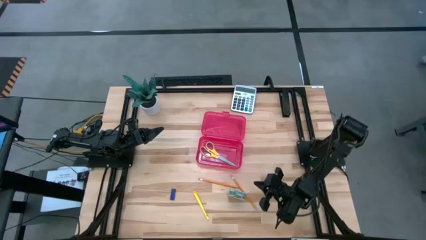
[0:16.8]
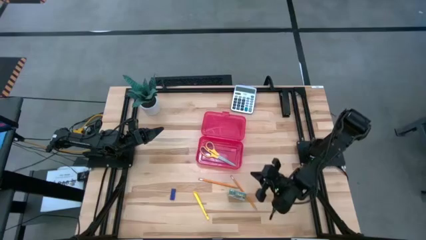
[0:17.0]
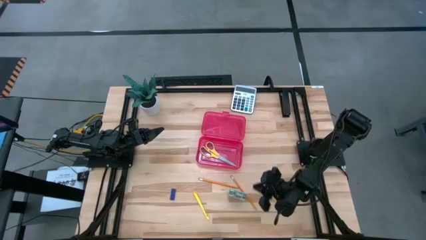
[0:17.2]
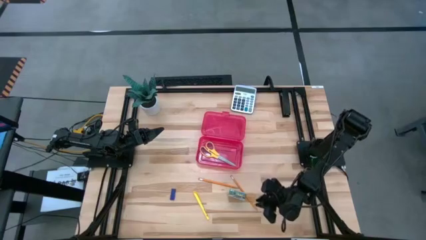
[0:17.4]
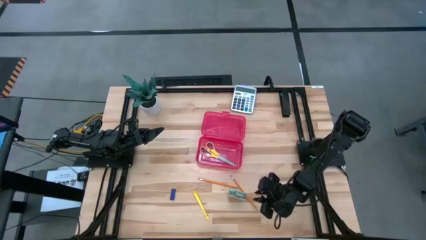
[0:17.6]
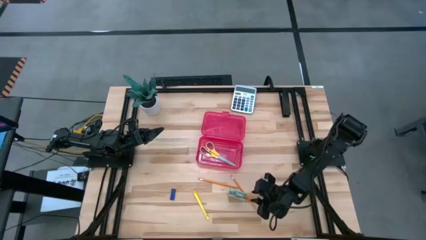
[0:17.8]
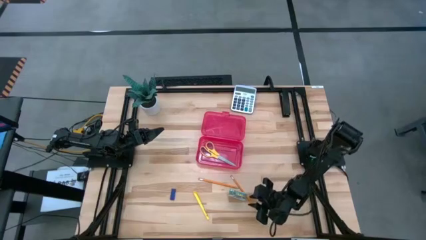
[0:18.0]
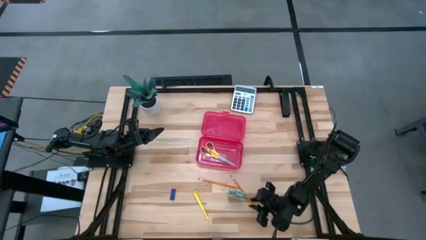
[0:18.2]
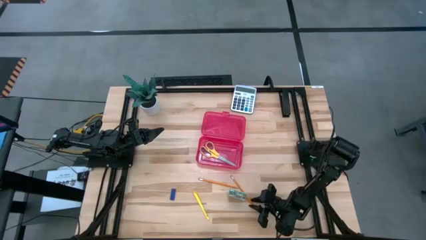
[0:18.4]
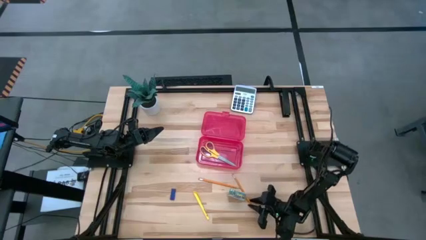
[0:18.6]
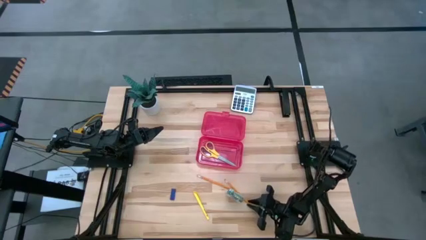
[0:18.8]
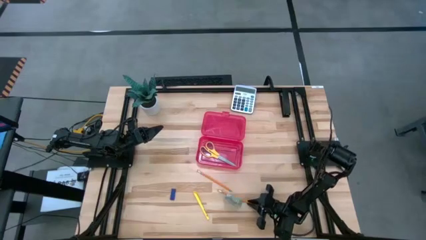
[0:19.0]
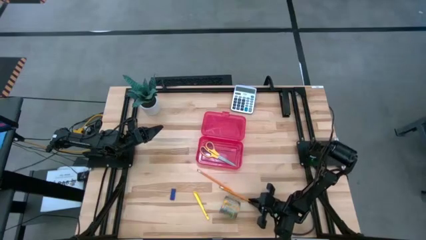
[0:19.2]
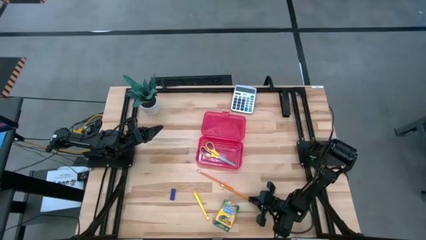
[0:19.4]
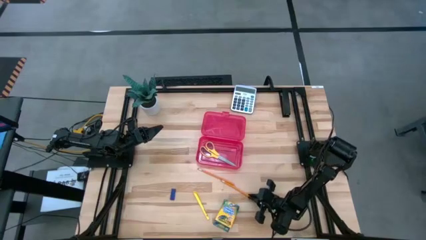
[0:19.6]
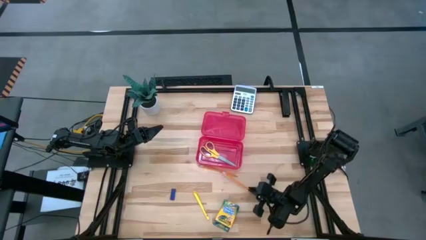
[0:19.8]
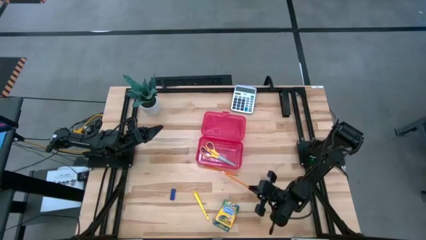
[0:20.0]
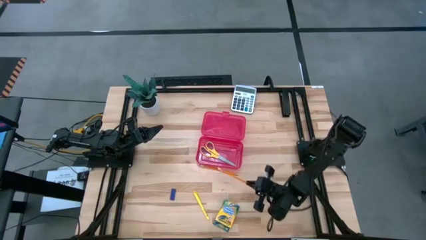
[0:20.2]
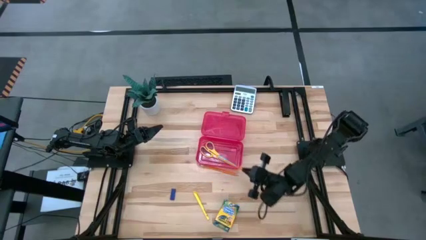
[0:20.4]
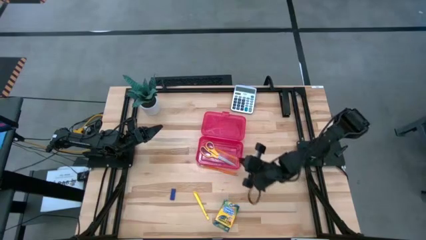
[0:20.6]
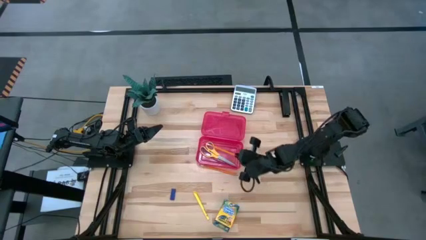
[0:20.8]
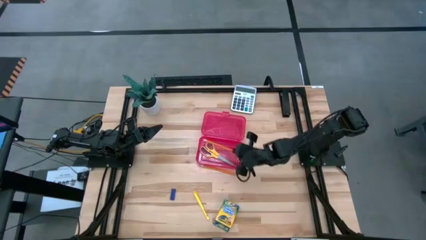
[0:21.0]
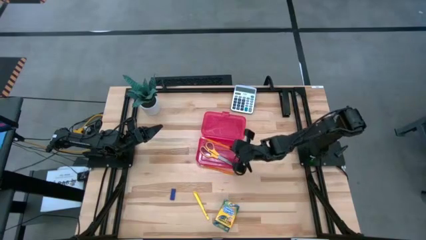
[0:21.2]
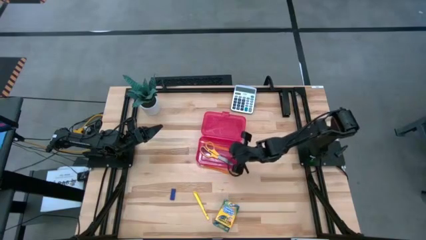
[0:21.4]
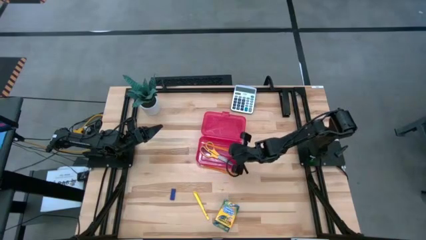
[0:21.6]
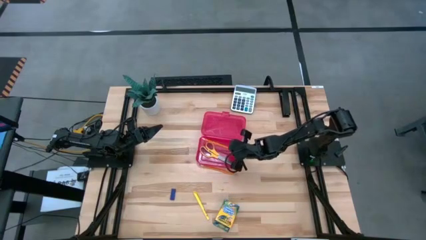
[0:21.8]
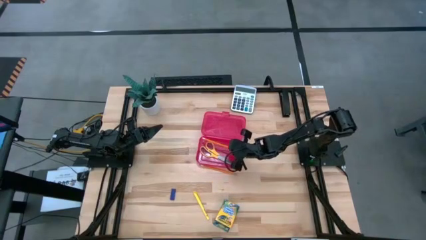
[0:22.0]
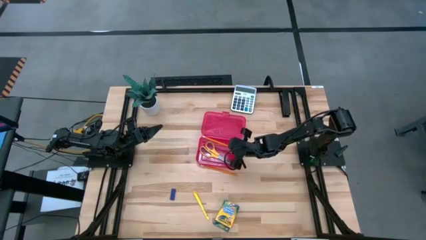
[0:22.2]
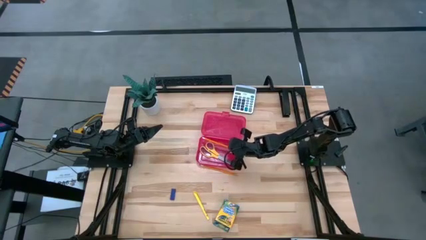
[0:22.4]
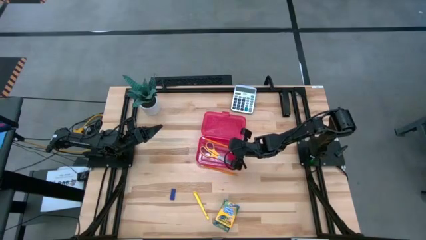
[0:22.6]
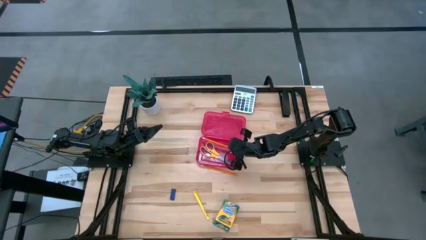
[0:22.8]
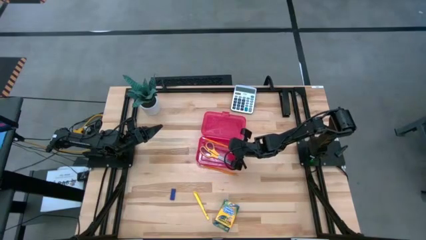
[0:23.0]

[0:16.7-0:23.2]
Task: Pack school essentials
Put the right yellow pencil into the red supply box

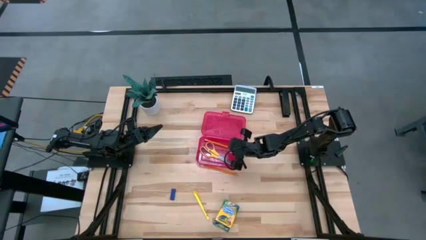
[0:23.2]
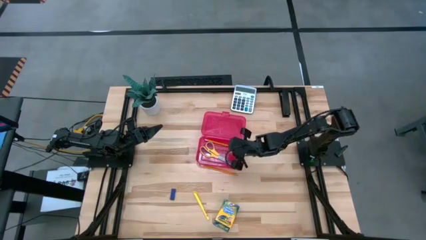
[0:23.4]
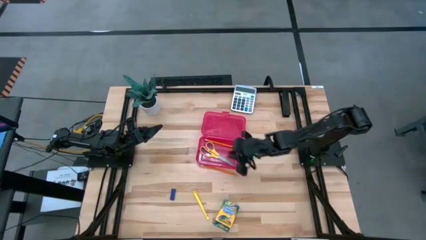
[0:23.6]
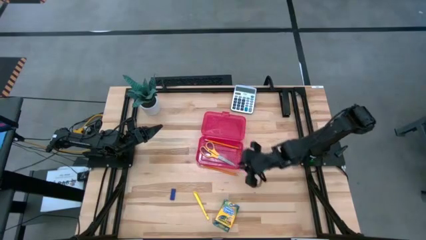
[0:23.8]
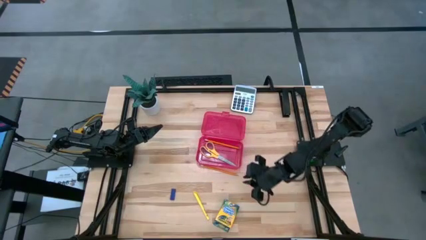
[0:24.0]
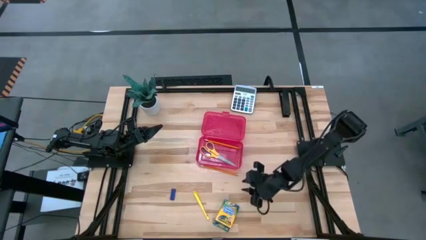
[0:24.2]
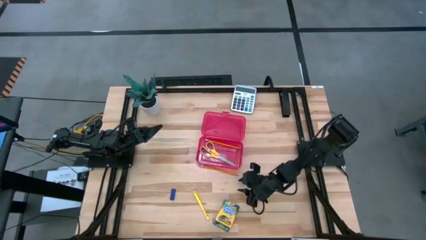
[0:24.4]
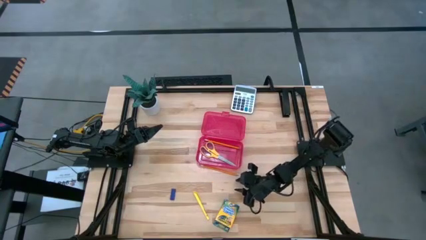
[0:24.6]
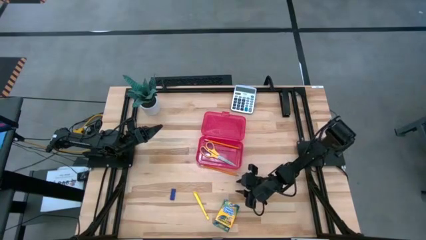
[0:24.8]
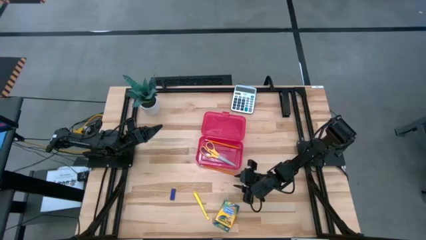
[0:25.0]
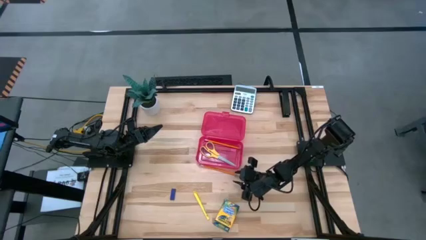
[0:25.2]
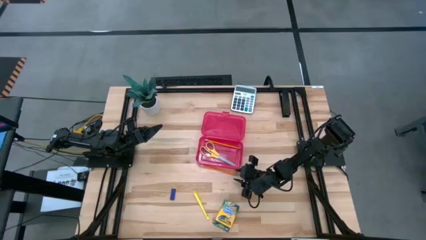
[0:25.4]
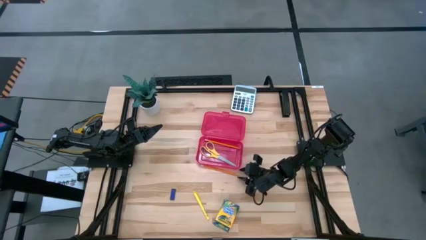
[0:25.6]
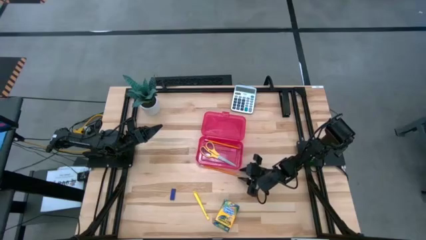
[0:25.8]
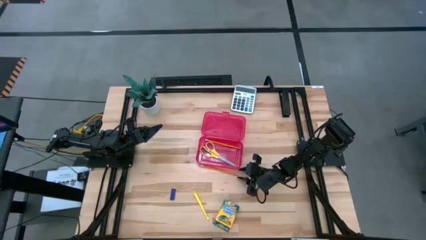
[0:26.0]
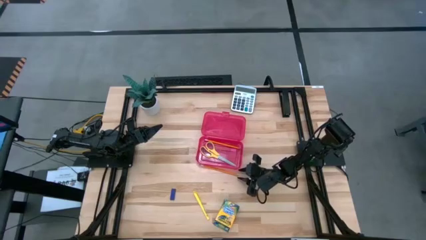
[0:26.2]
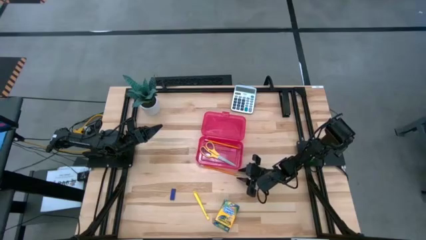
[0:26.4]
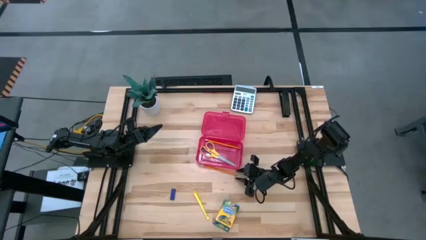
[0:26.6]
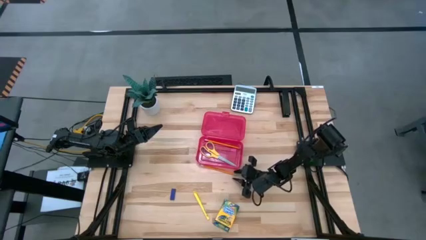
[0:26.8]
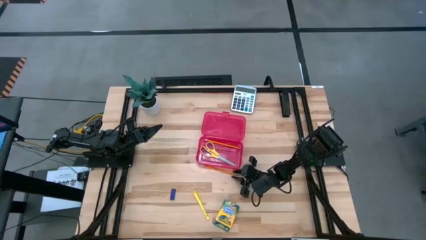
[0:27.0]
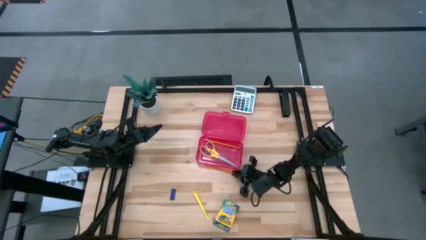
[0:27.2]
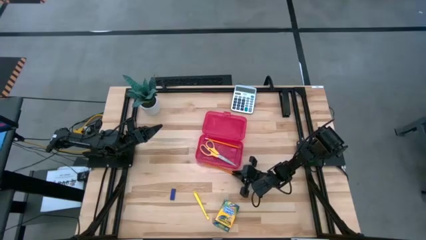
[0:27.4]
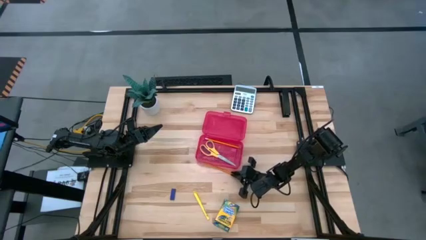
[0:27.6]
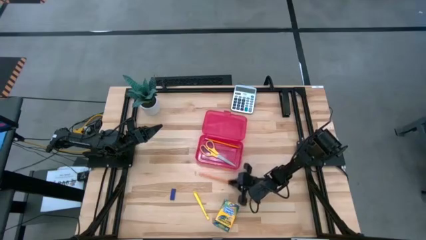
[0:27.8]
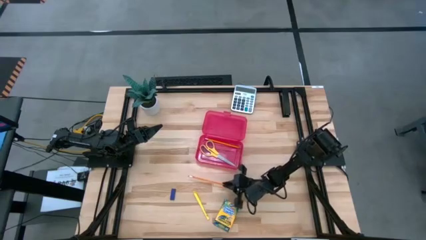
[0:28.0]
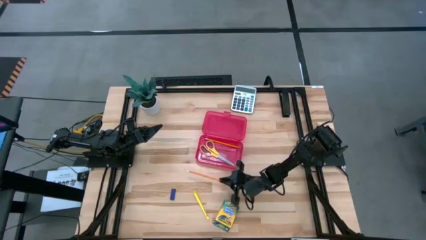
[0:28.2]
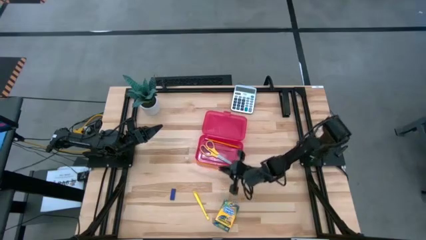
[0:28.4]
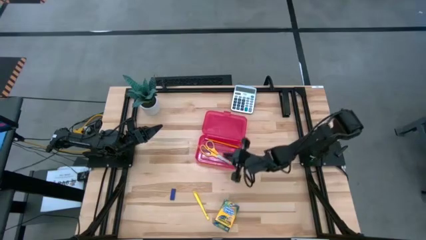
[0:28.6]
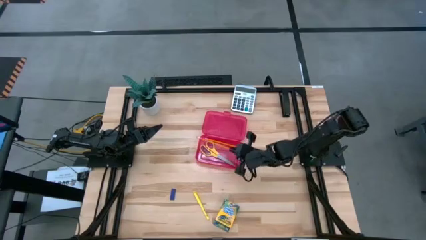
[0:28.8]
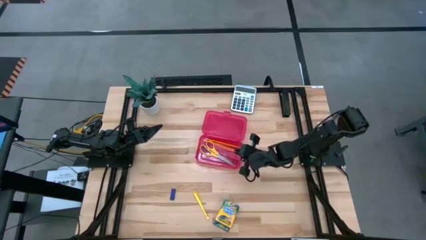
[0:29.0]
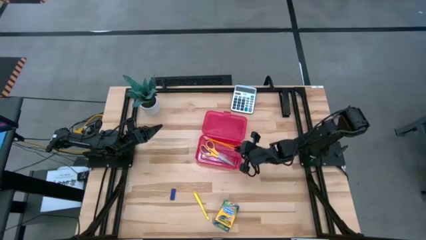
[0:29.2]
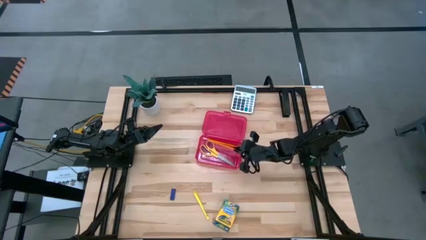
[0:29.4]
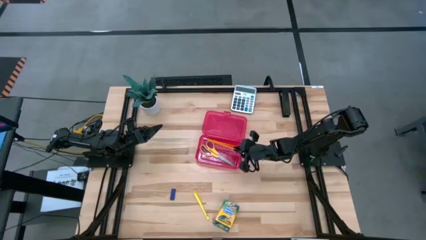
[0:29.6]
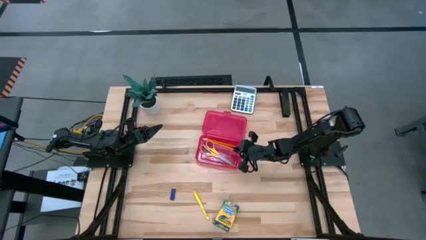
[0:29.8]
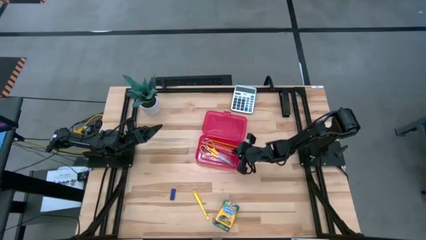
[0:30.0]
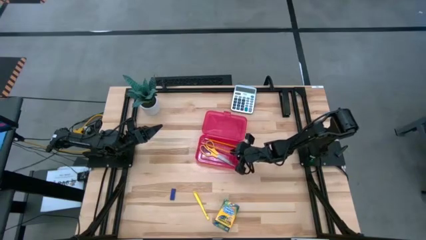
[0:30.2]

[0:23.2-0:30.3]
Put the yellow pencil into the red supply box

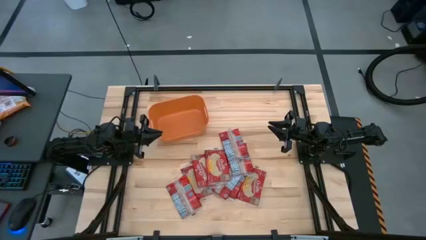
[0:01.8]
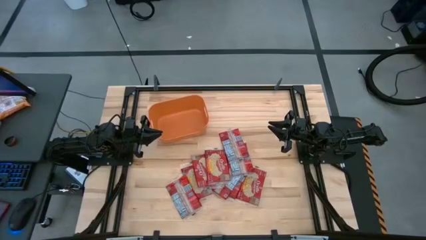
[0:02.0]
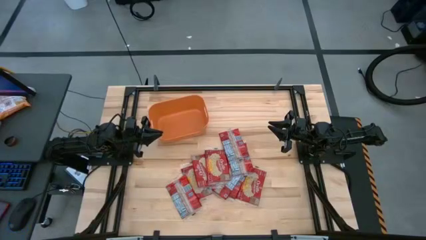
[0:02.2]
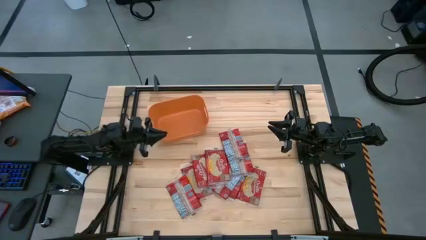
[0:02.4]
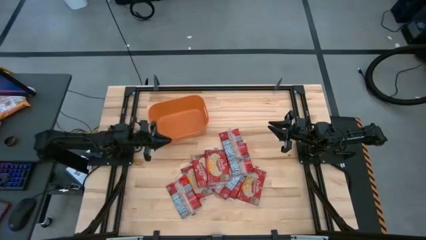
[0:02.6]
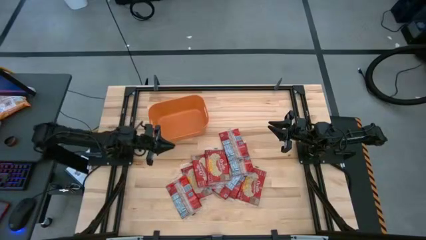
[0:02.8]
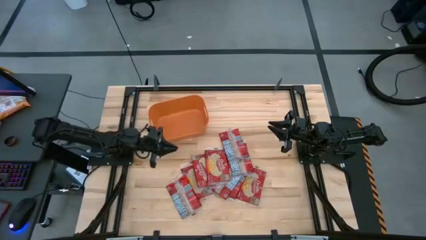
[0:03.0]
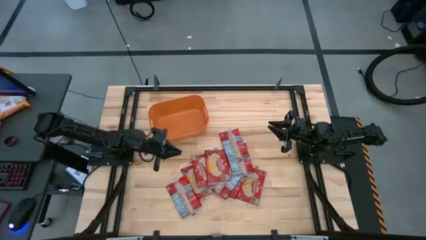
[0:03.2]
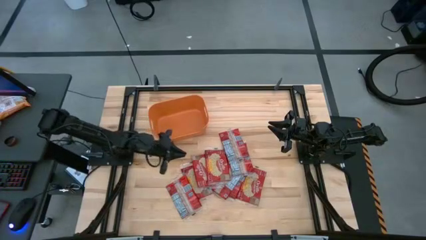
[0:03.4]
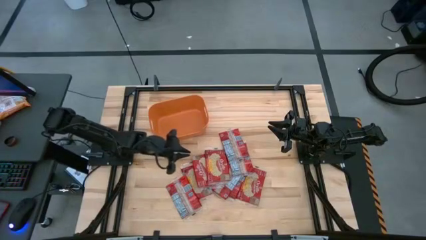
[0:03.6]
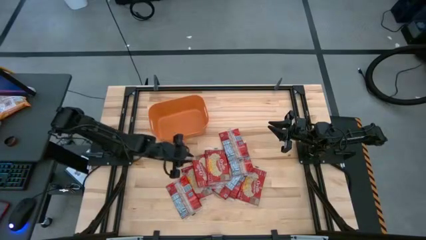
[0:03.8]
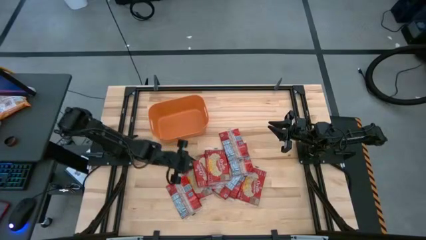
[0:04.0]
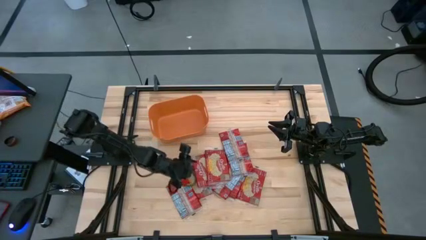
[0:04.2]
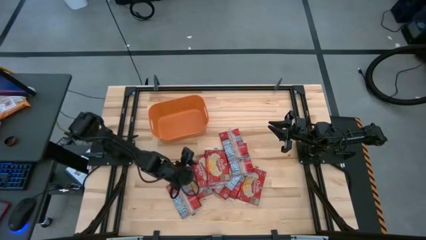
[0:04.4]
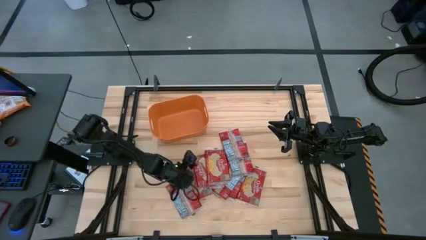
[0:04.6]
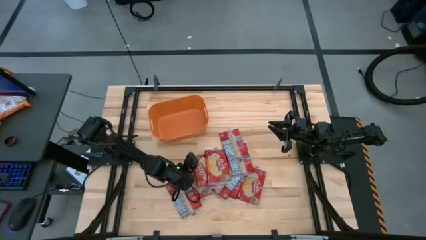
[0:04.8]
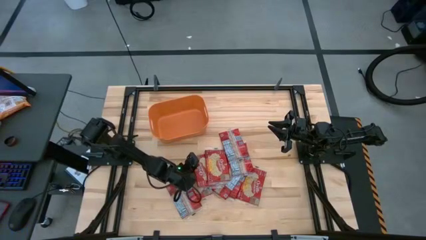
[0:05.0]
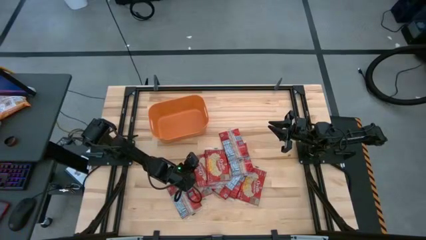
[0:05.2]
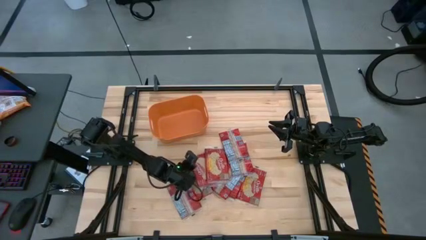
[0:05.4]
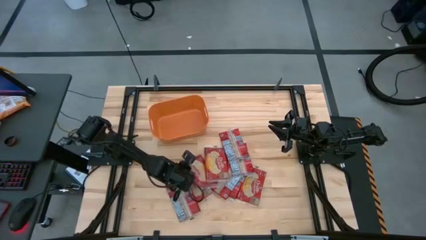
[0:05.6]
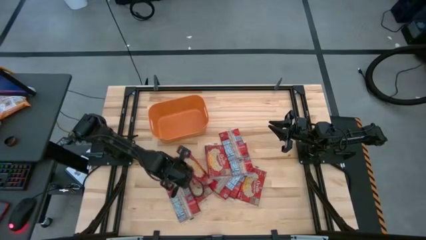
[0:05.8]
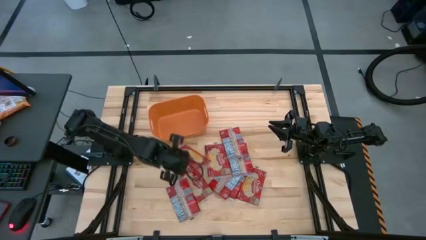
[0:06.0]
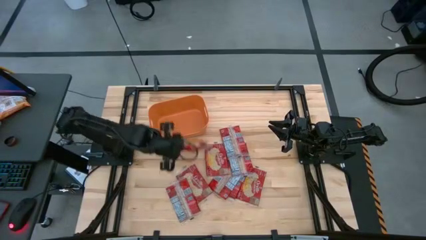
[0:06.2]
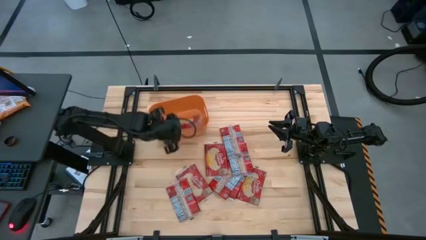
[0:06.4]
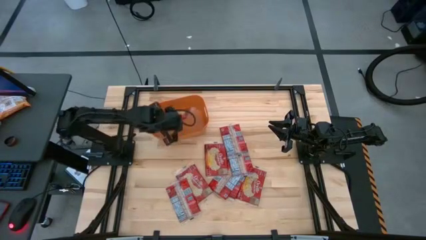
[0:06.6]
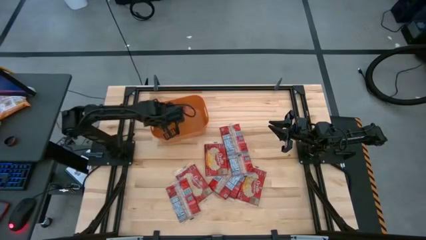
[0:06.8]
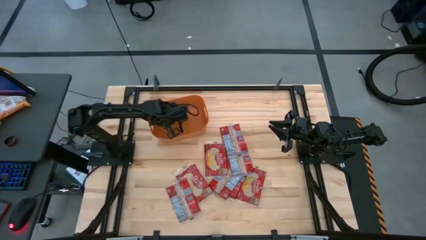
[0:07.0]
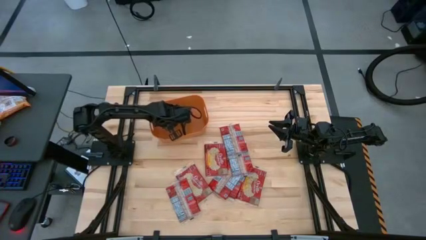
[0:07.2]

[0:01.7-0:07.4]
Task: Sort popcorn bags into baskets
Put the red popcorn bag into the orange container
